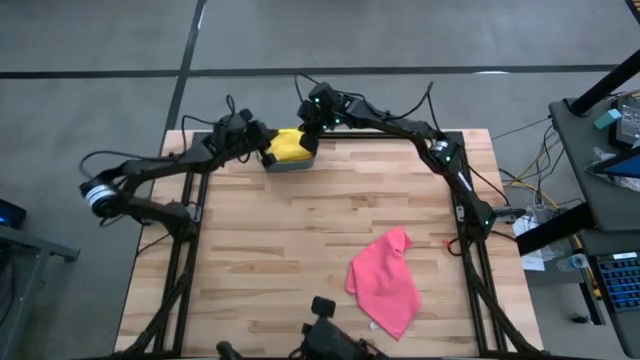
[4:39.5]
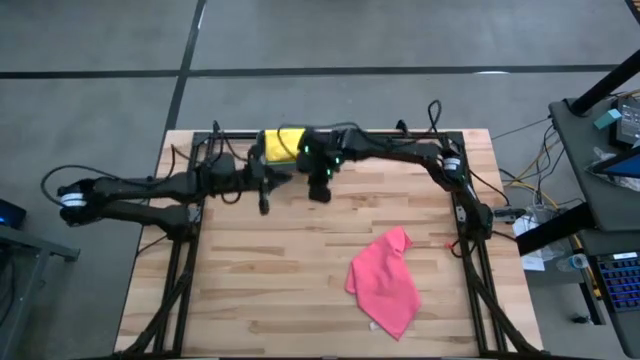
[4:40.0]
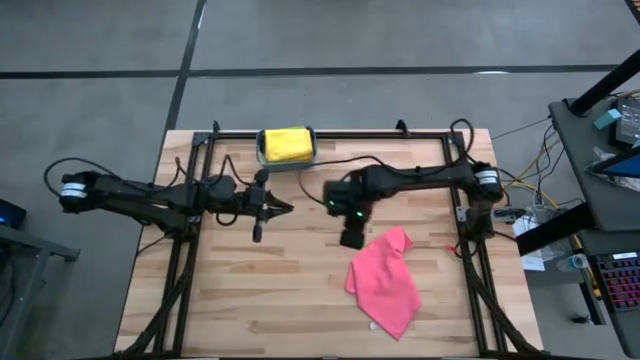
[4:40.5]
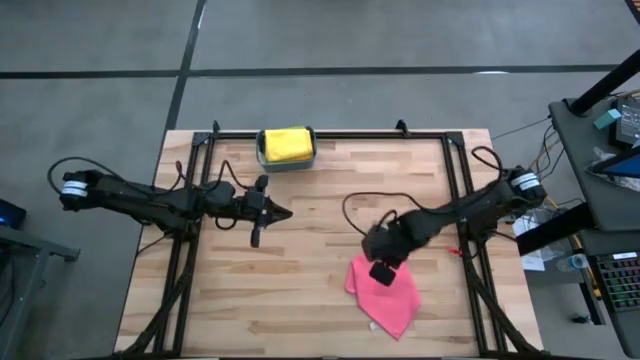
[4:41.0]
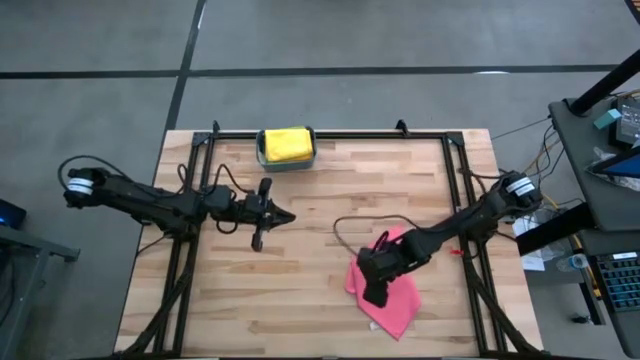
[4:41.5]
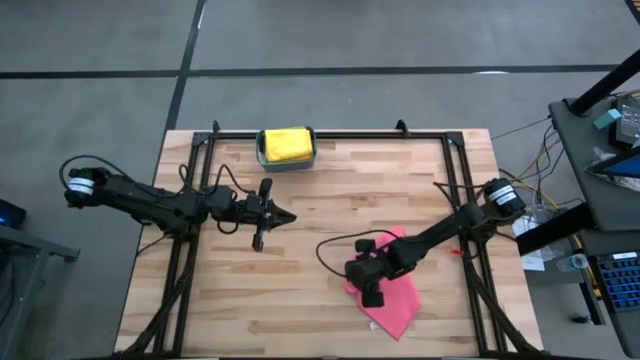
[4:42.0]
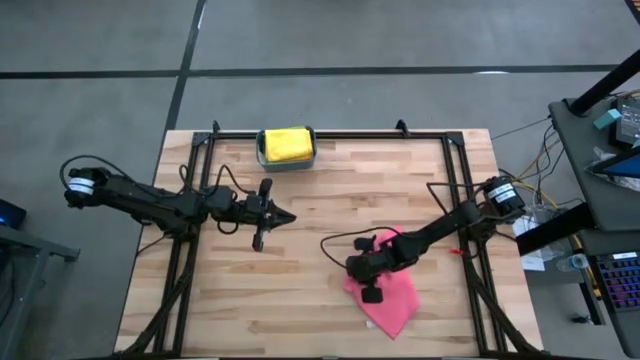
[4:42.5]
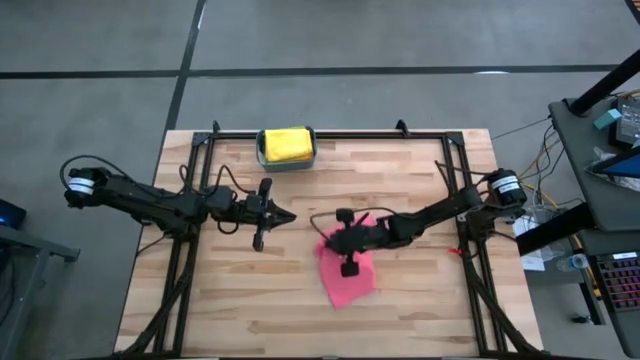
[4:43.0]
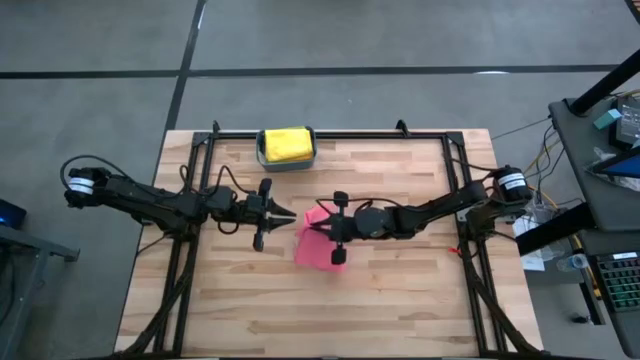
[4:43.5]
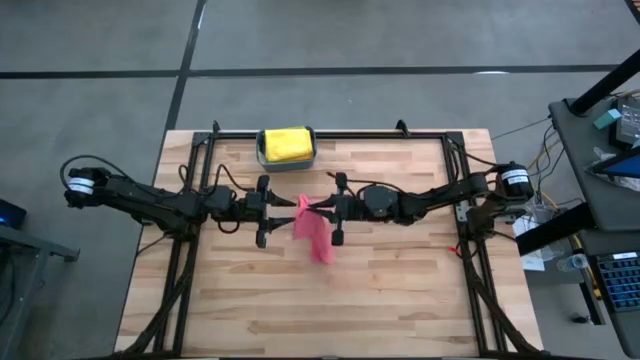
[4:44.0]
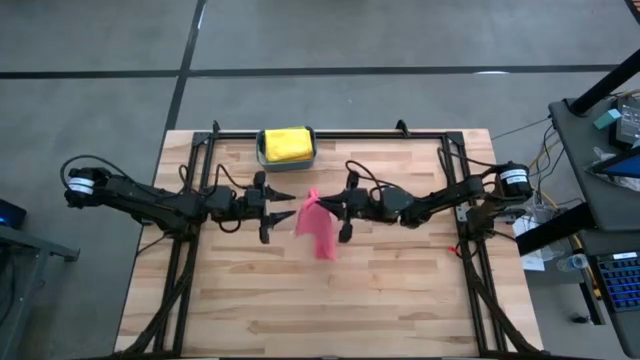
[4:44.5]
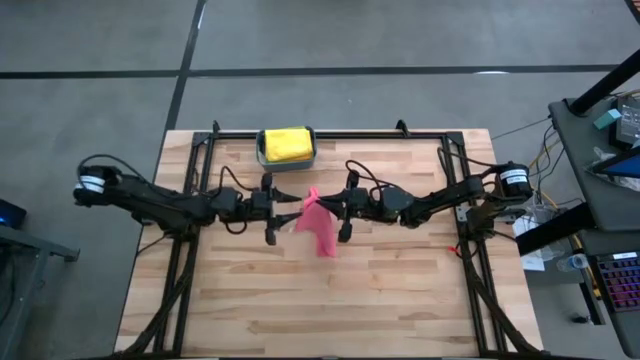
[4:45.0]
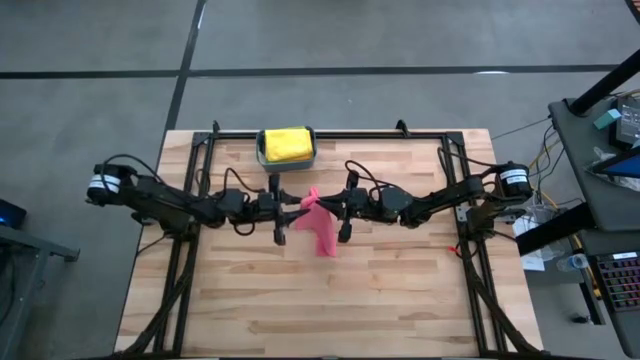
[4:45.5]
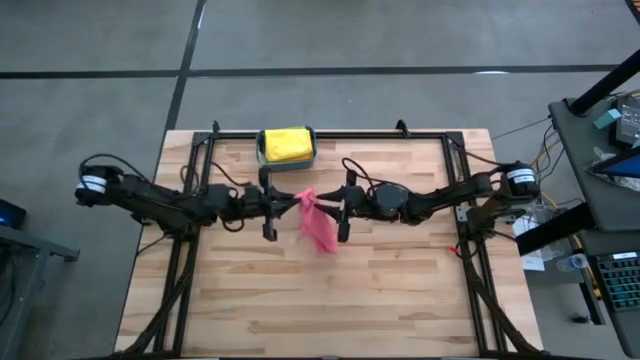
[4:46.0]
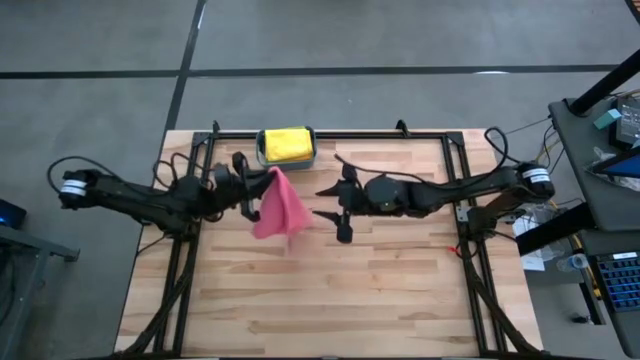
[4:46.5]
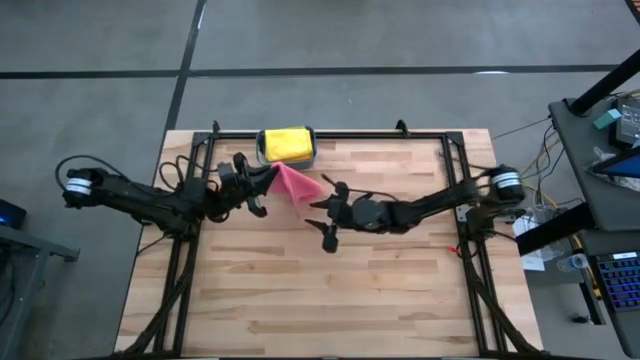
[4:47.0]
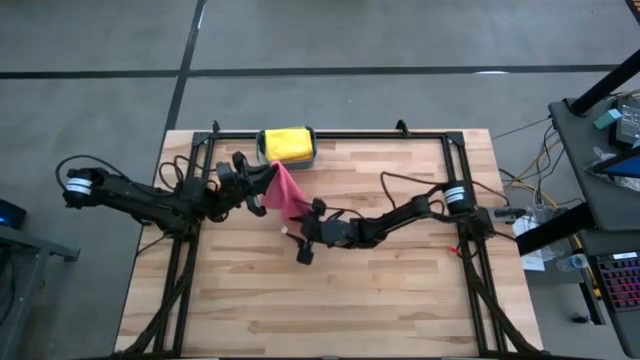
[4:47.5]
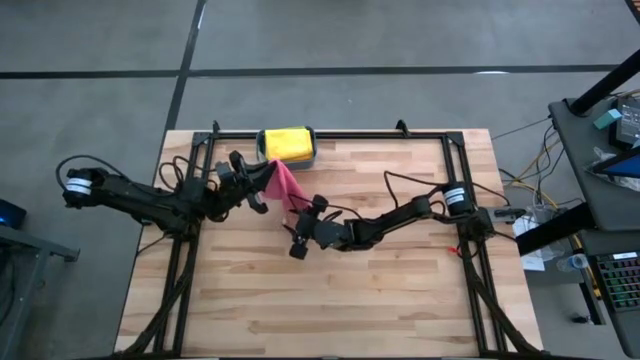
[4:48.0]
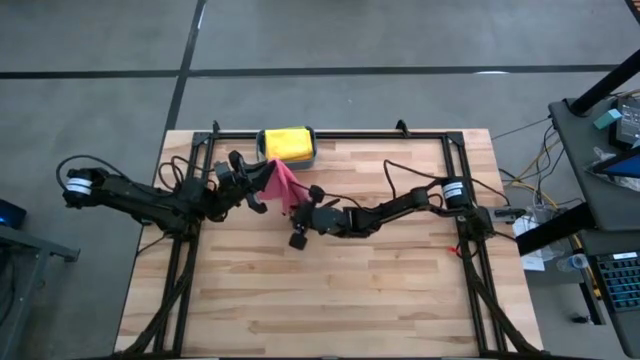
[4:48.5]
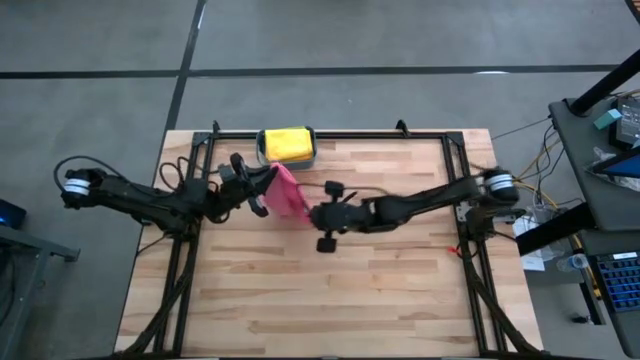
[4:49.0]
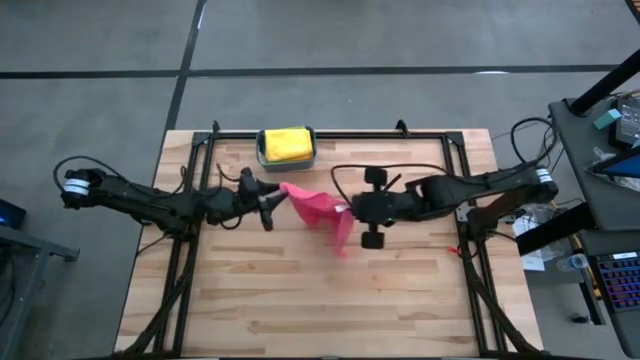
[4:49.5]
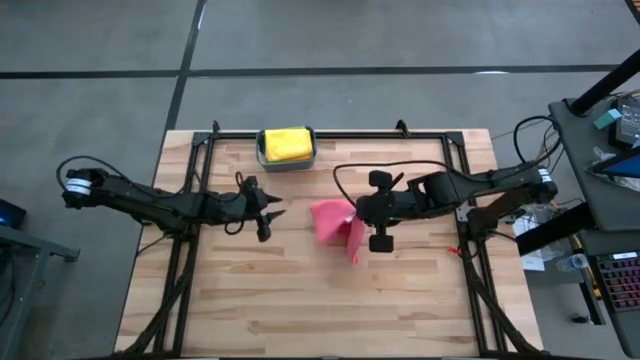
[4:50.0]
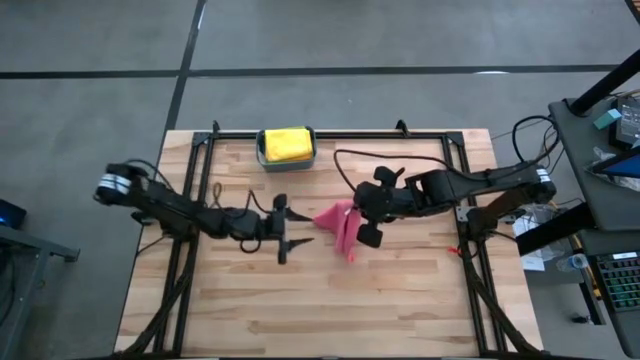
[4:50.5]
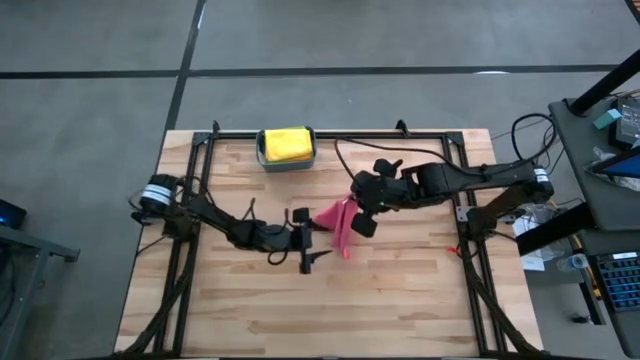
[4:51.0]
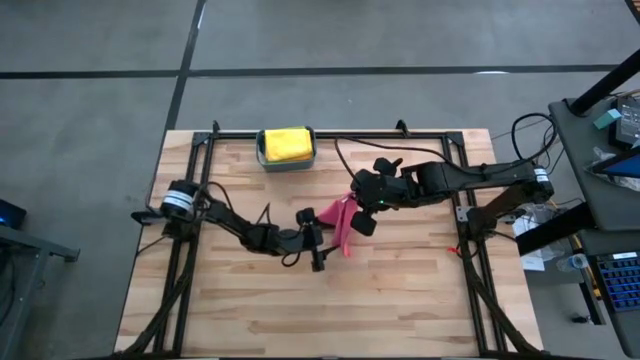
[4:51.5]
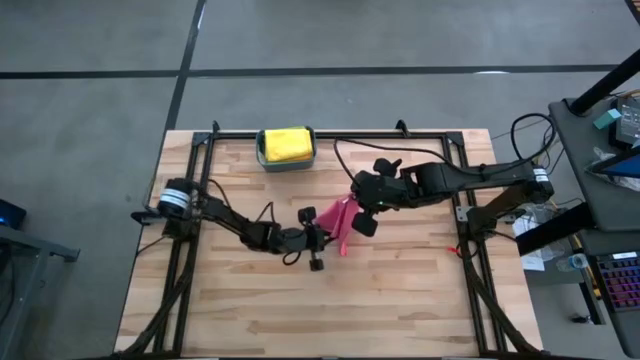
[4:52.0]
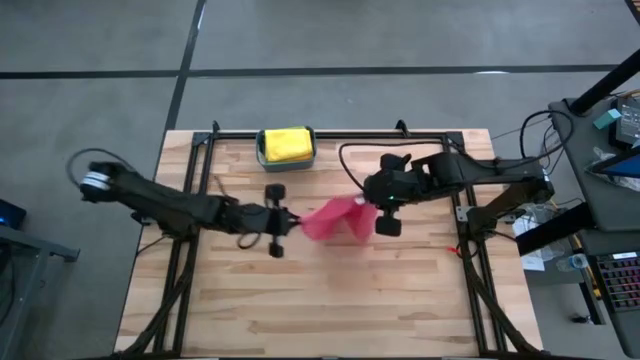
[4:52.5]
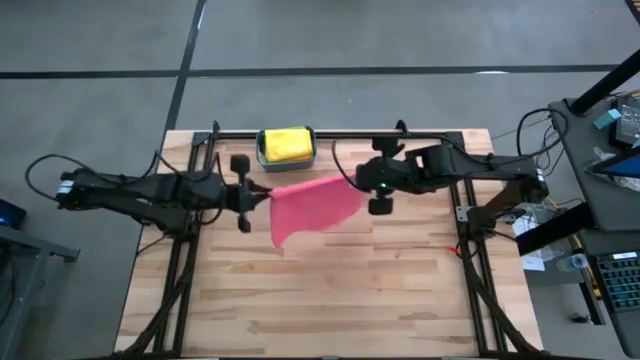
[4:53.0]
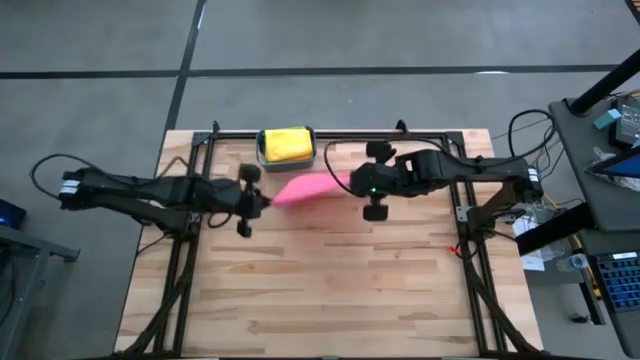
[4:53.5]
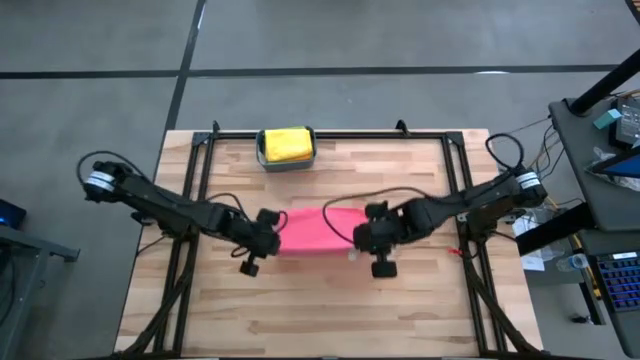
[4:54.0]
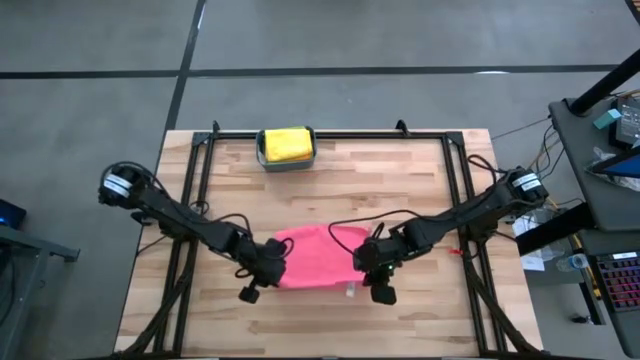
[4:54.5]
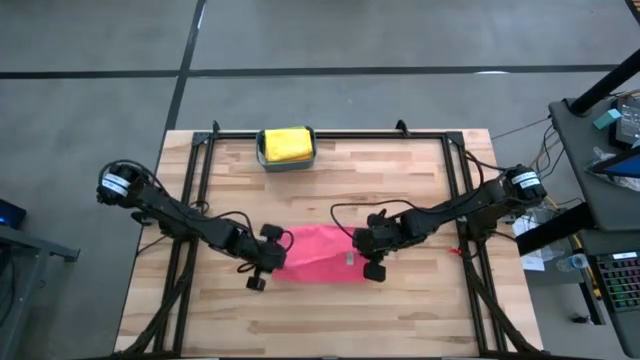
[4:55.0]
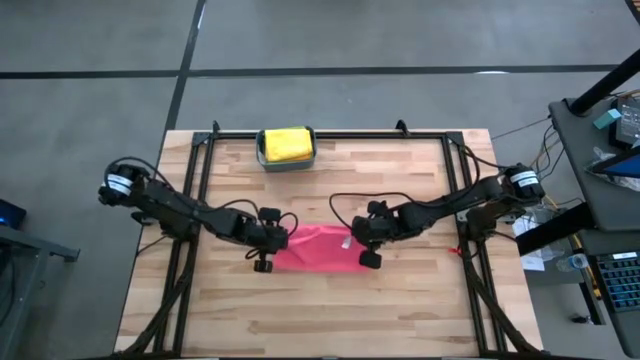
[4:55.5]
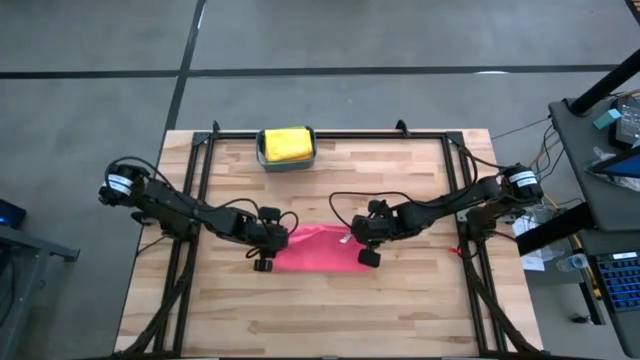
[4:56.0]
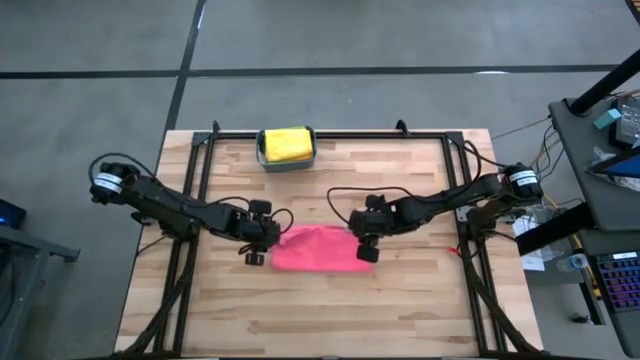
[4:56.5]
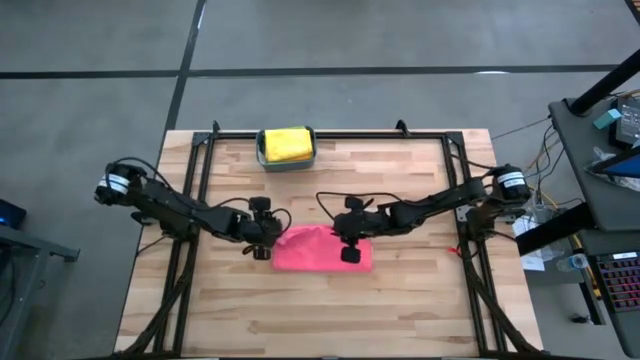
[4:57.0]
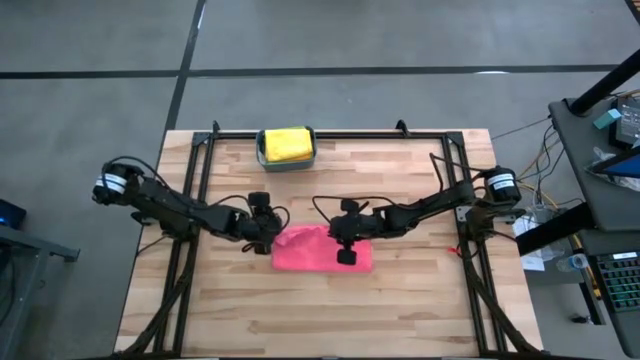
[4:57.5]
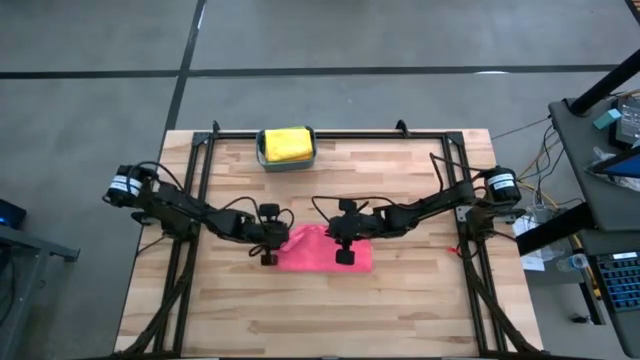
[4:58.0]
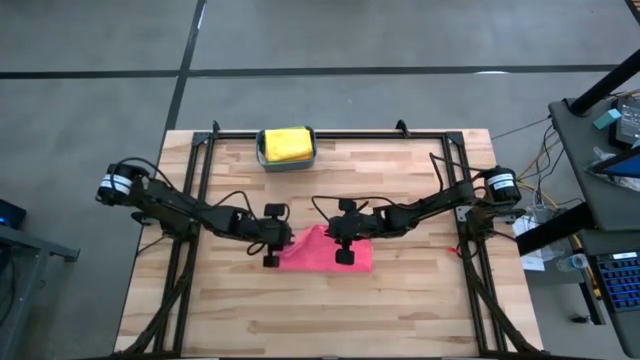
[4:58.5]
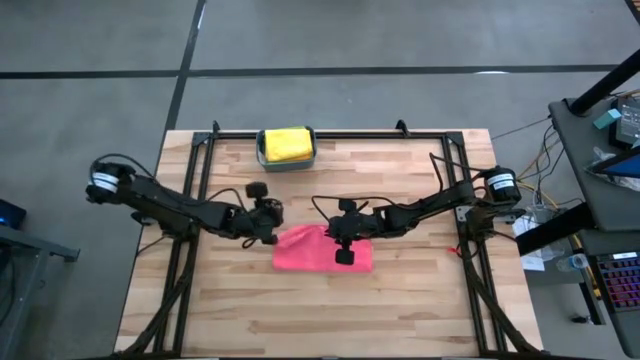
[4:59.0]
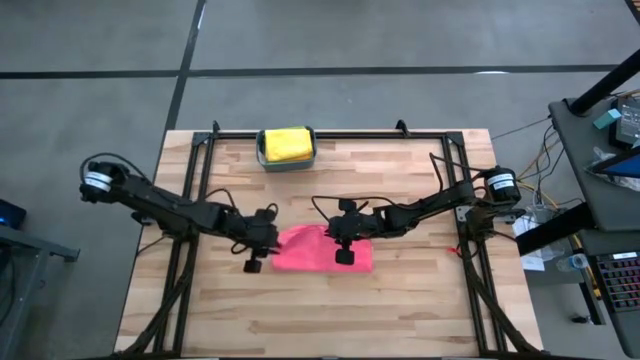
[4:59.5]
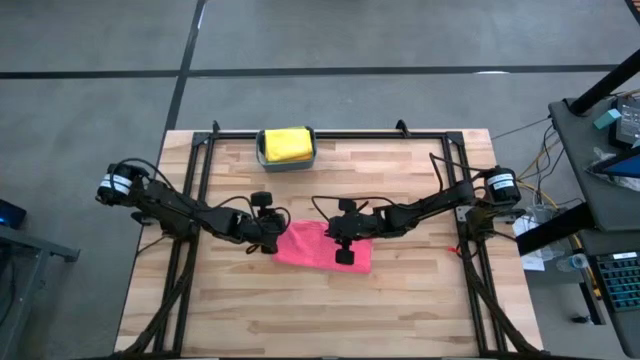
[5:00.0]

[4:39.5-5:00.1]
Task: Fold microfiber towels
Fold the pink towel

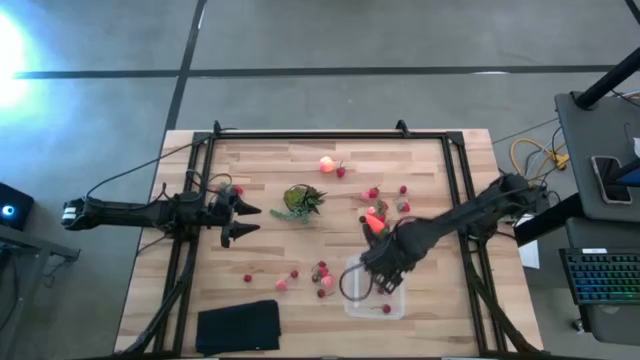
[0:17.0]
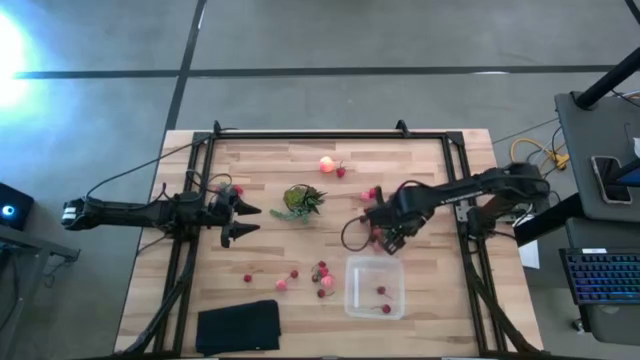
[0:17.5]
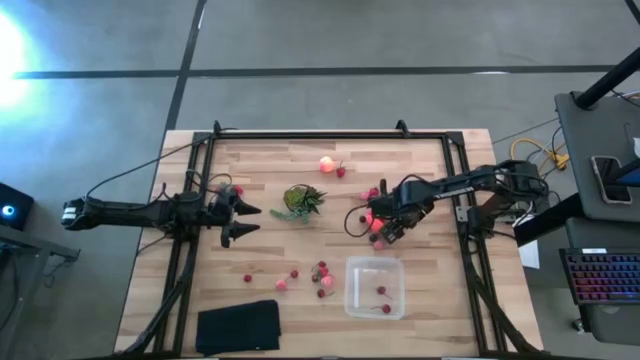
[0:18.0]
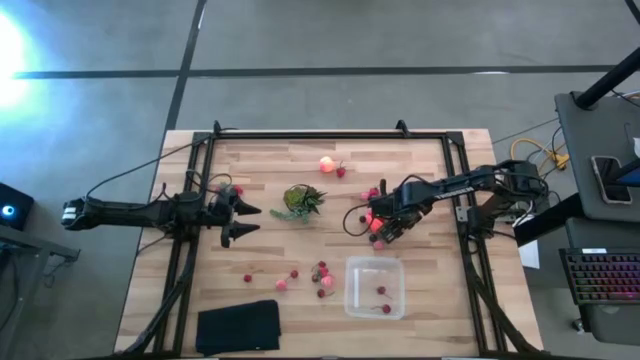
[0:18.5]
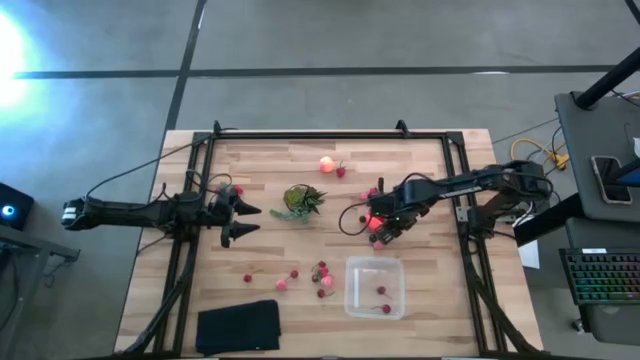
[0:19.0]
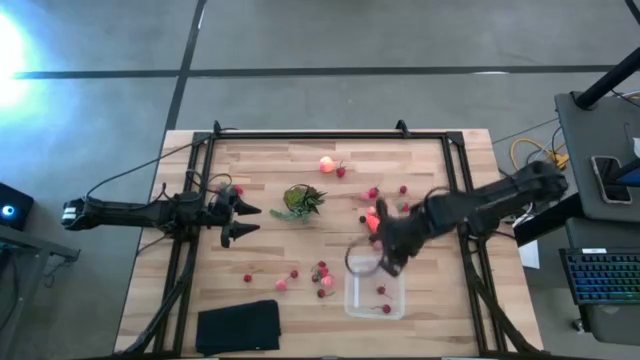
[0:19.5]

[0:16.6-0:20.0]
Task: Pick and placing Produce into tupperware
Put the apricot into the bin
